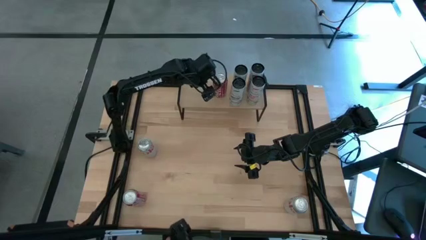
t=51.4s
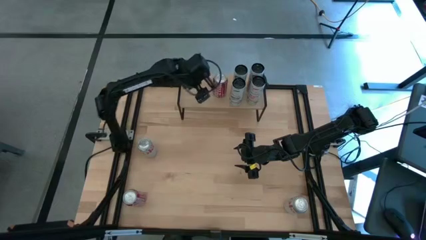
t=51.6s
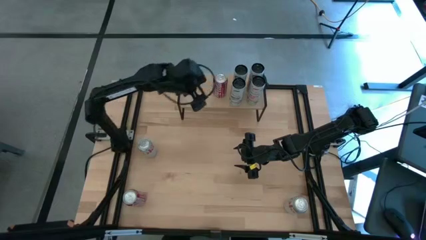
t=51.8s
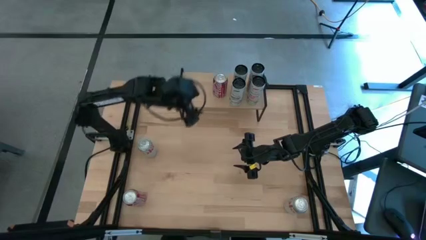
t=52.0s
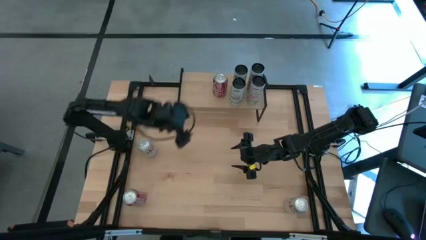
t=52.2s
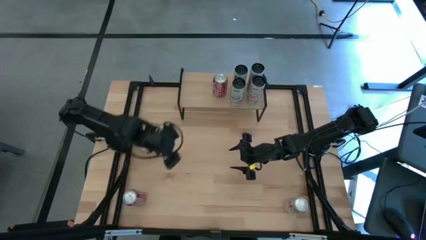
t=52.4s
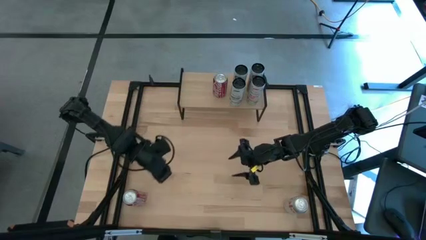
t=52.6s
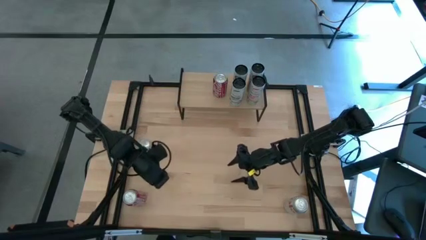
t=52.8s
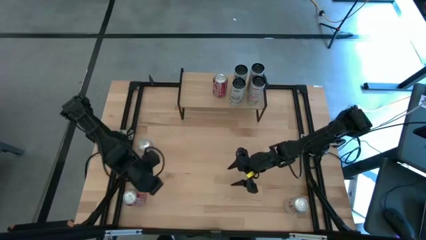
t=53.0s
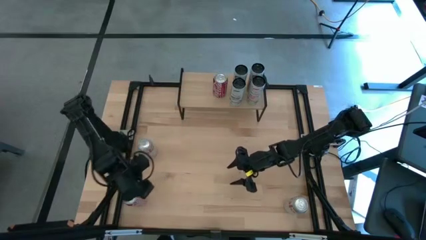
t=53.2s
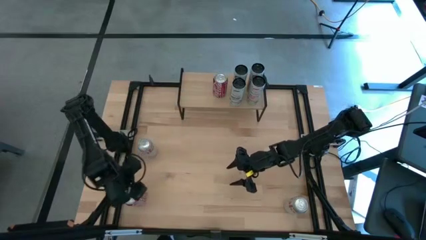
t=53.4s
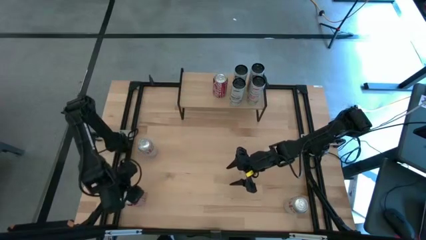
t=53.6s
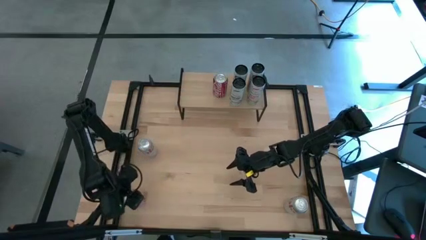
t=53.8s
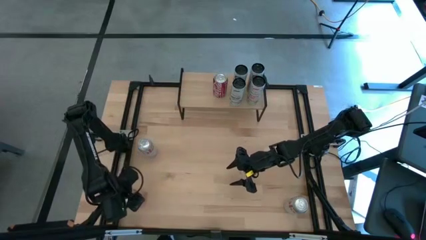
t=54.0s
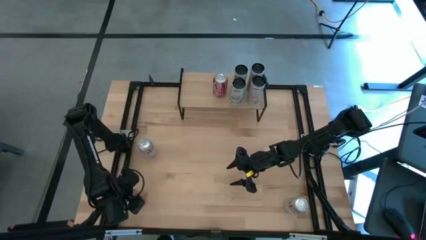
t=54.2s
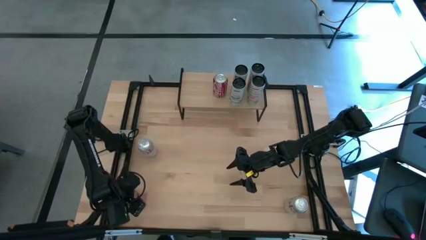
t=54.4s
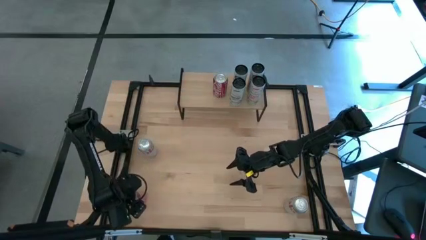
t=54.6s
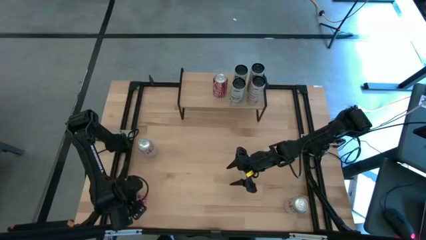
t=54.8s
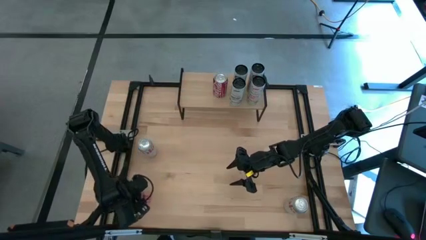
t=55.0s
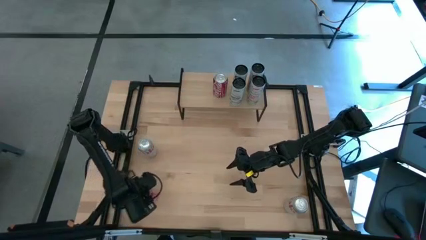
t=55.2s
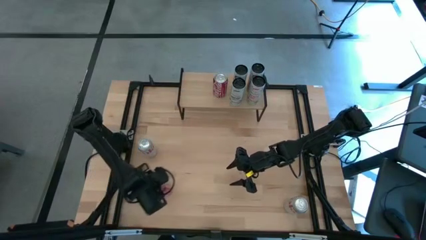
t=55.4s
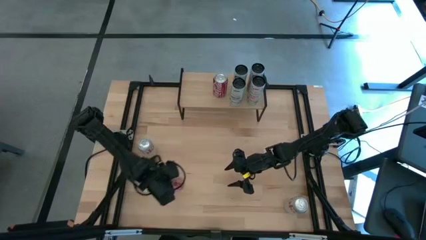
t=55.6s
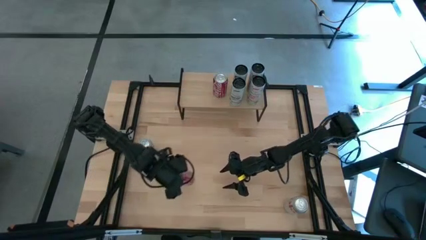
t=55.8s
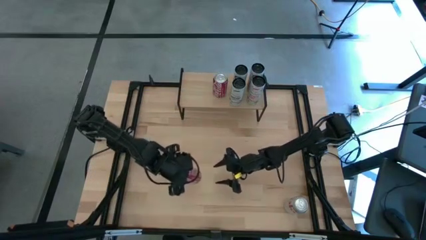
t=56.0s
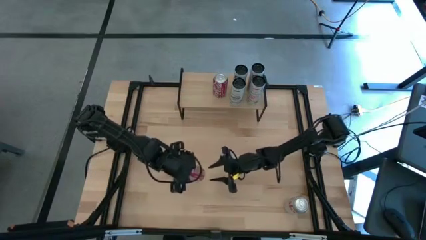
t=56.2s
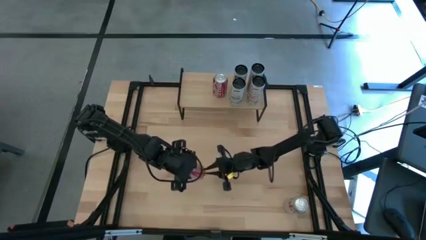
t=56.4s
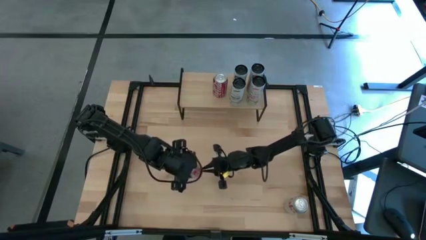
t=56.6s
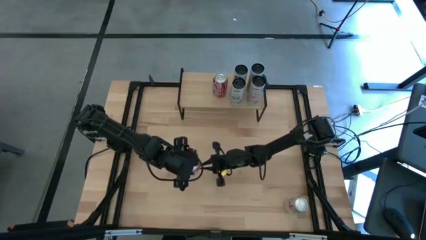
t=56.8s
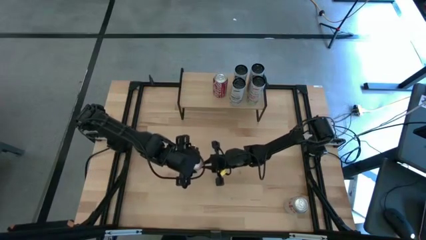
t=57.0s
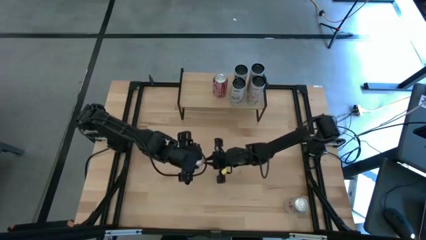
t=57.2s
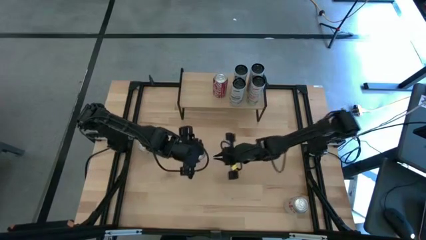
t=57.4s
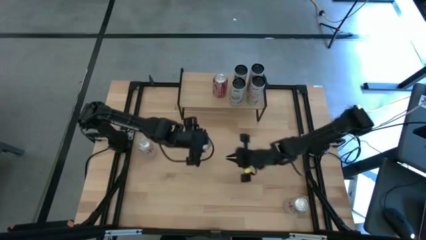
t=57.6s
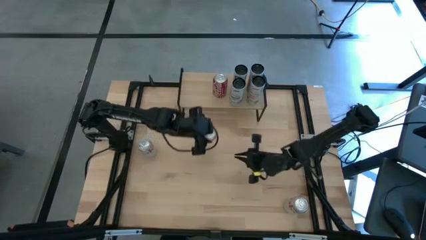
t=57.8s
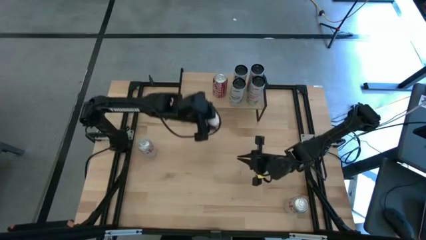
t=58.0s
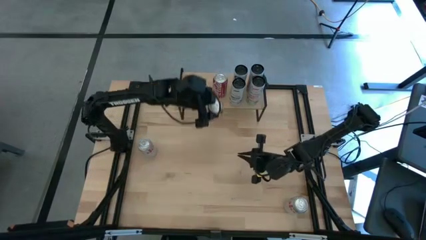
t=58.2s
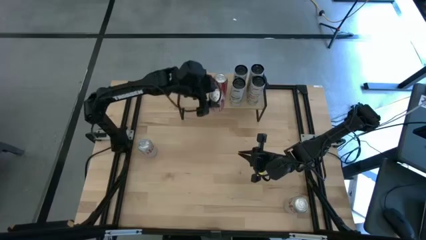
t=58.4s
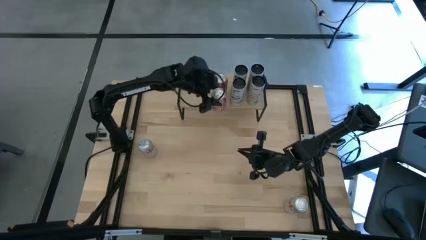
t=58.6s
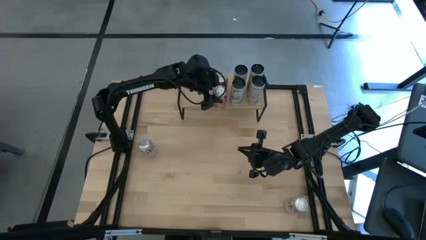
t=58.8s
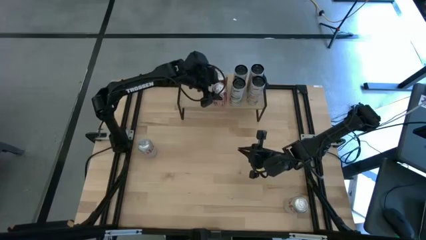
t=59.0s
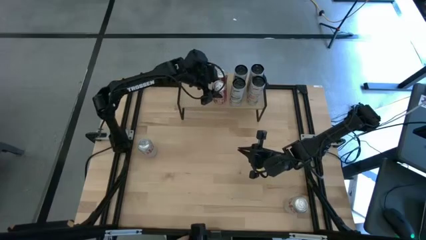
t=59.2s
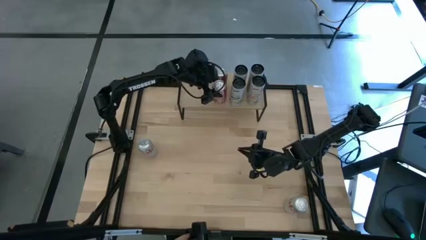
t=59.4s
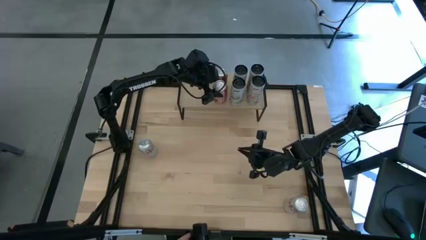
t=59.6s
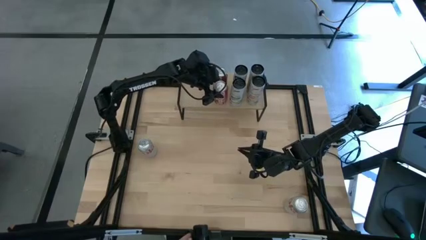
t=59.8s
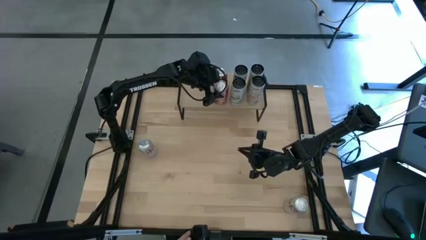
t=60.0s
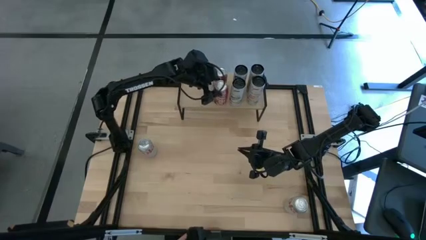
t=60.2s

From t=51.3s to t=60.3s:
Task: Place canned beverage on shelf
Put the red soda can on the shelf aligned with the other red soda can

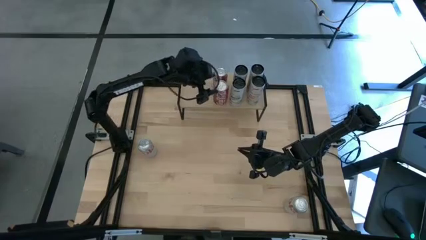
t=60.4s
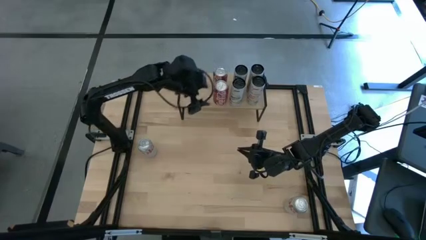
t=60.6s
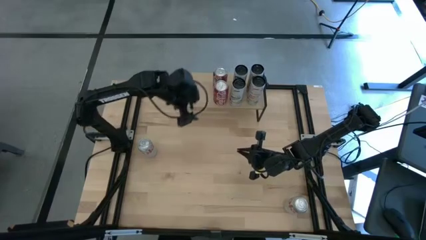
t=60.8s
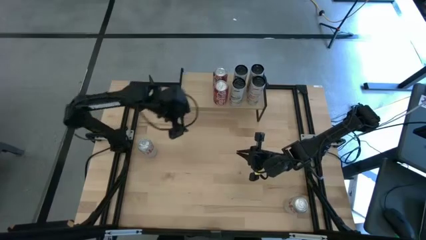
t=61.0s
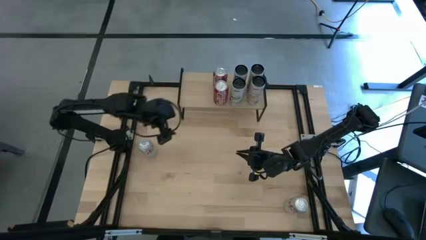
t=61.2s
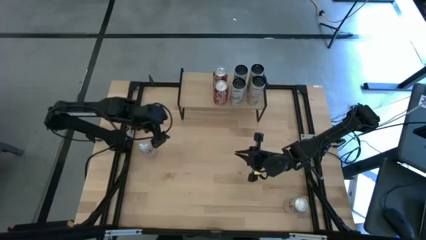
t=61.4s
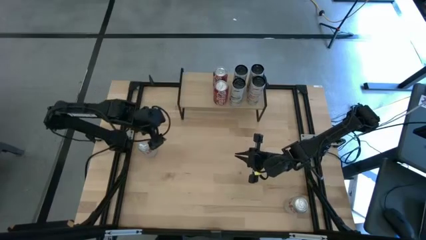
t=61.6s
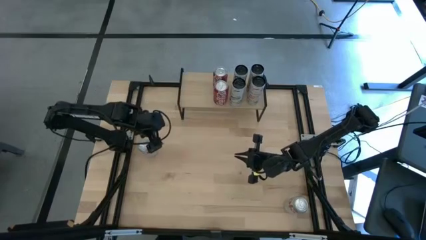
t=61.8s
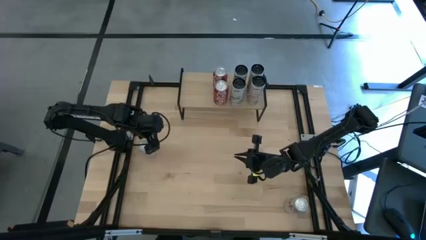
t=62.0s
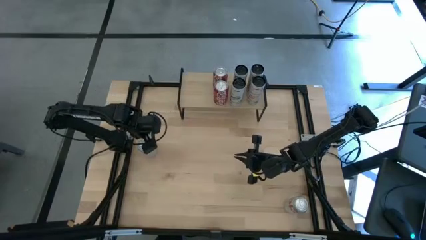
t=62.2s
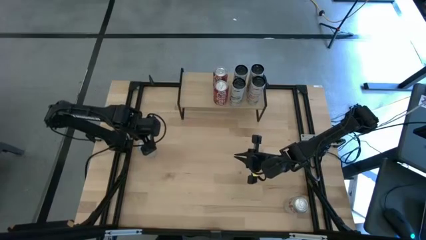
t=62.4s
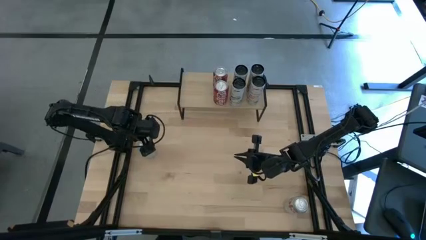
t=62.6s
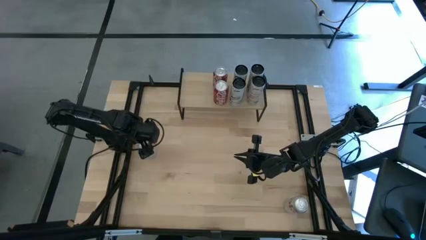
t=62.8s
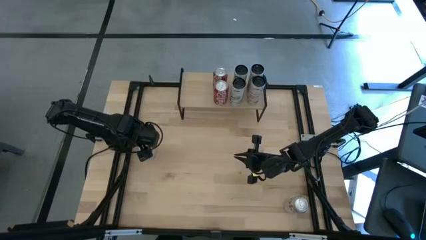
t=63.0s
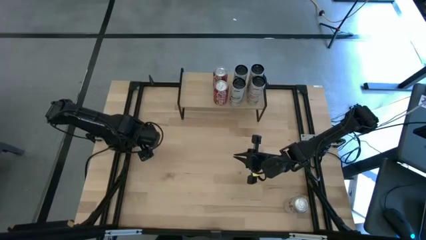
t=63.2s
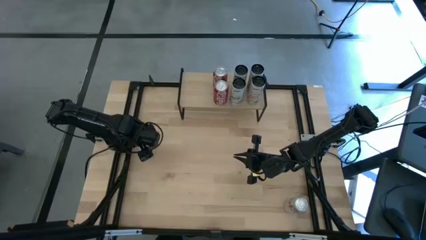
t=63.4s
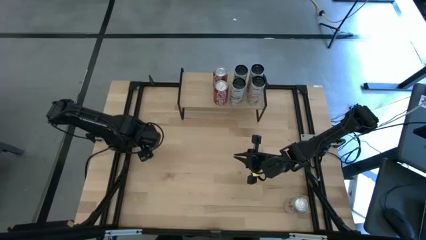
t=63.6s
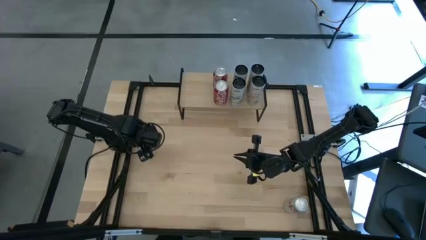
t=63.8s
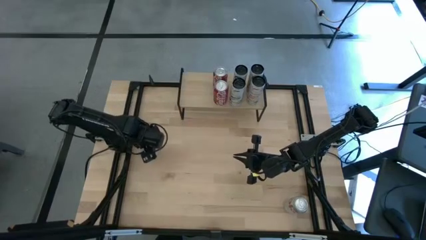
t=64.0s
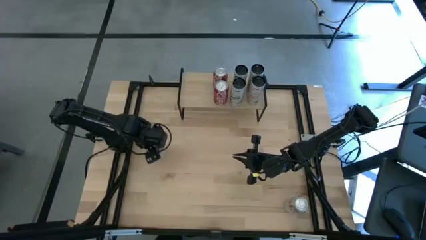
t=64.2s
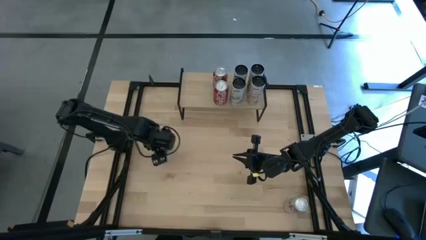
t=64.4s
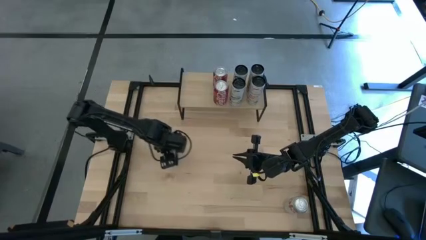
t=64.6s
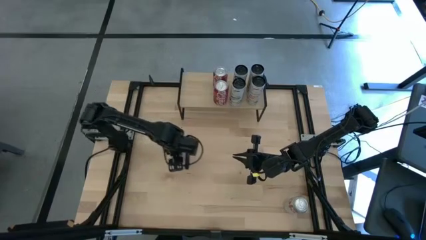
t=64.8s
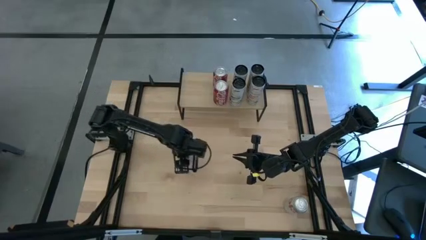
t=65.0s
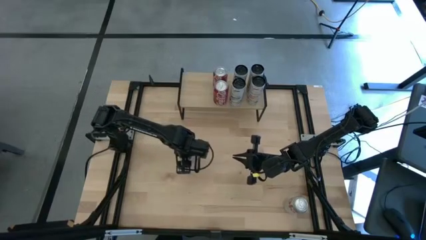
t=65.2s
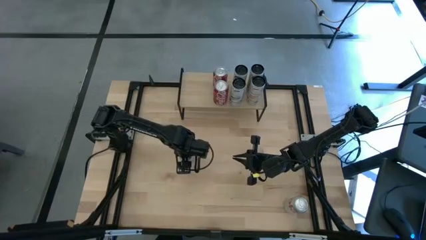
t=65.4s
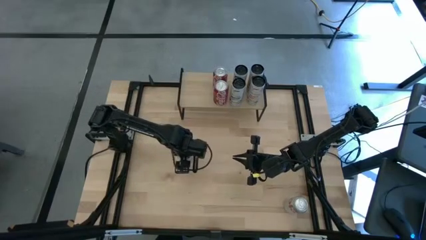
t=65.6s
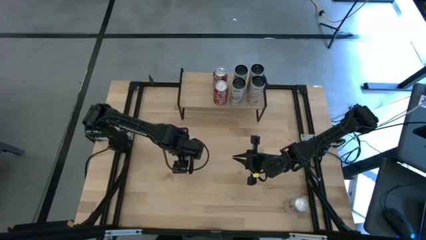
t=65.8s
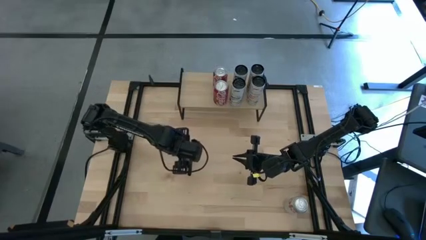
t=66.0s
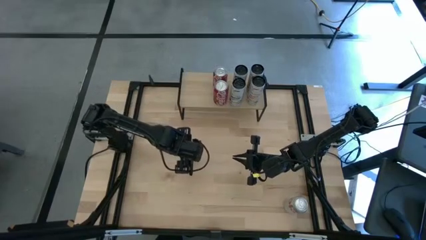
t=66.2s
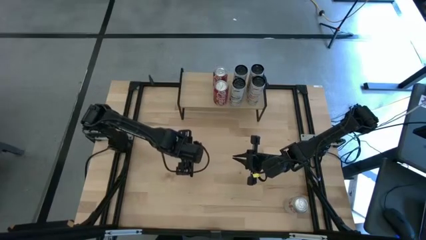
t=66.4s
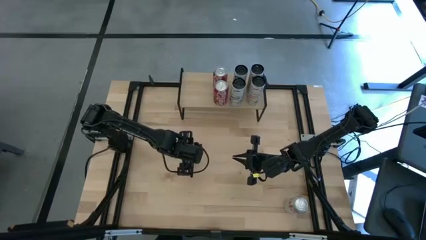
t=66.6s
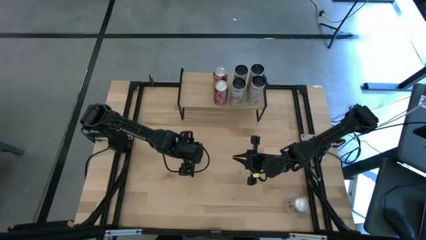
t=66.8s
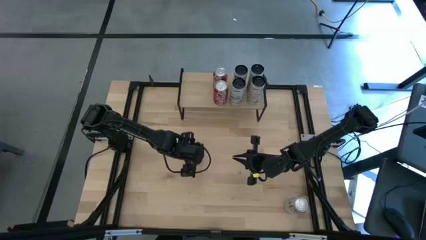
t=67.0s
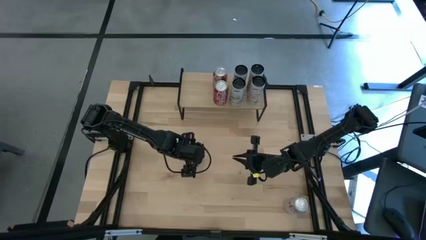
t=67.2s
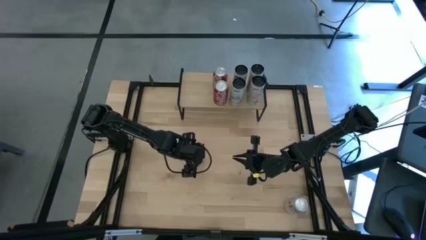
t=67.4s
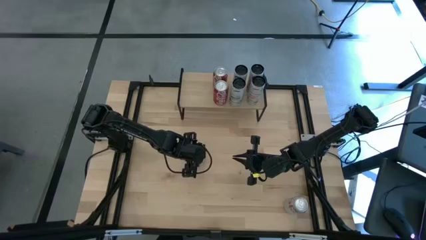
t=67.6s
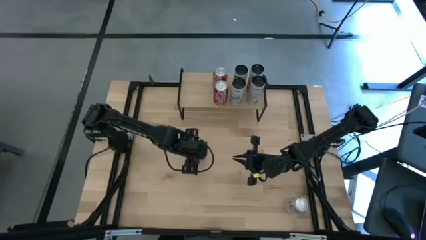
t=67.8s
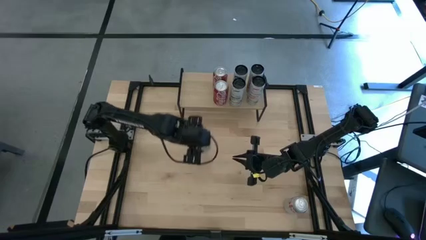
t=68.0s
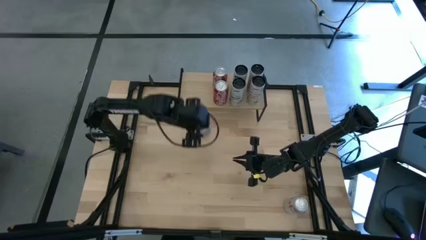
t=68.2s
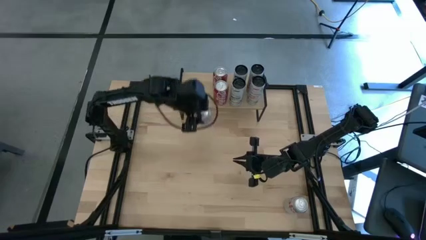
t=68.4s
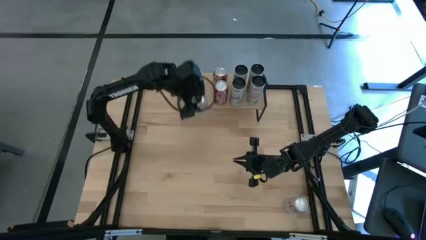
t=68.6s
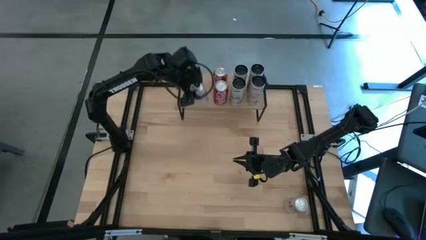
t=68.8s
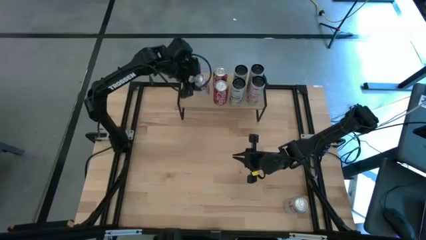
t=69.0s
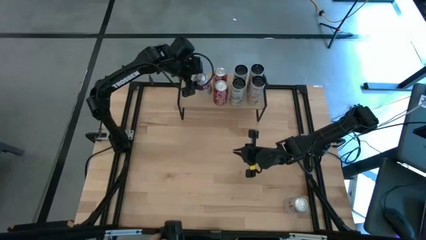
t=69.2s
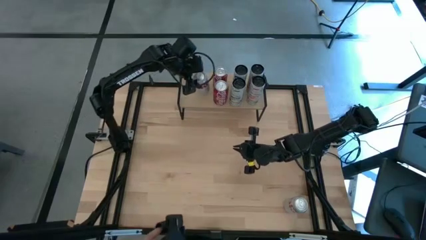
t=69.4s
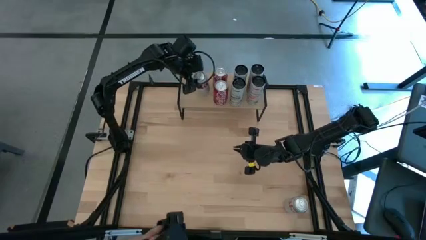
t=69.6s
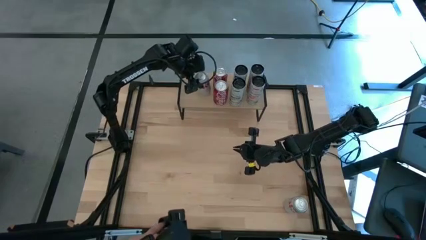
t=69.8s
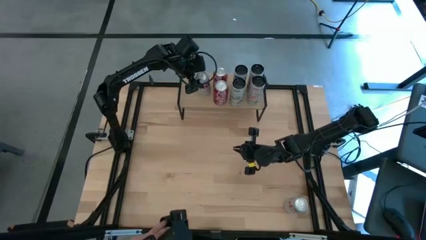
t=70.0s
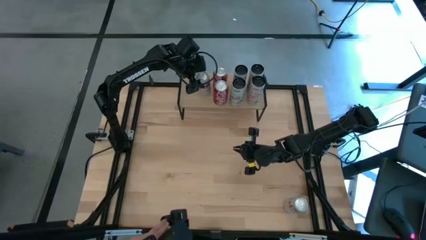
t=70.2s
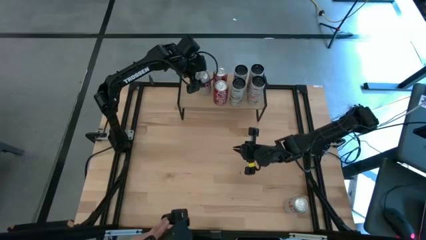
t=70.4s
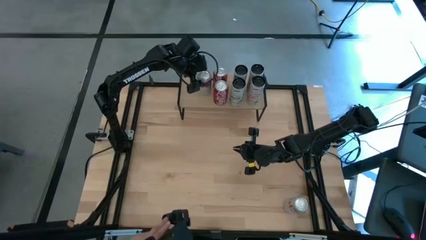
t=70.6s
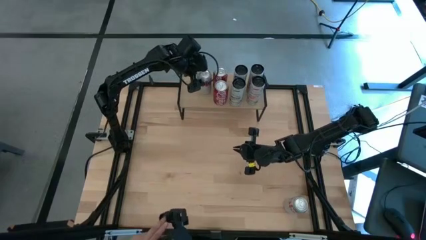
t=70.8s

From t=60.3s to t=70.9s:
Put the top silver soda can on the shelf
